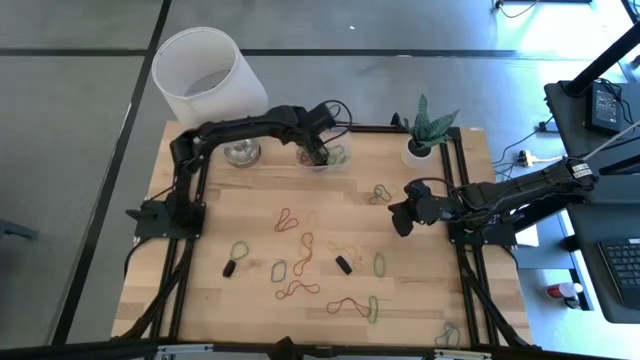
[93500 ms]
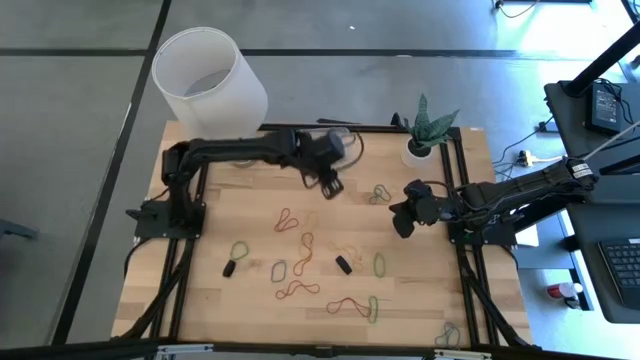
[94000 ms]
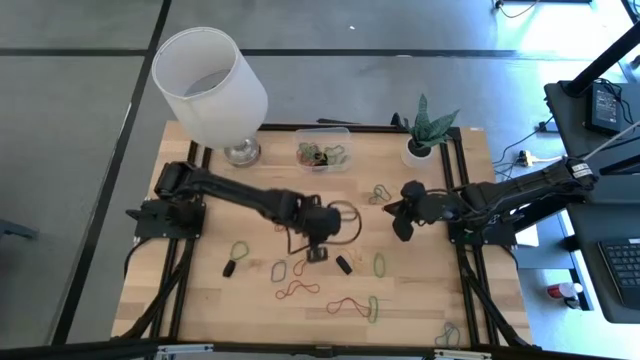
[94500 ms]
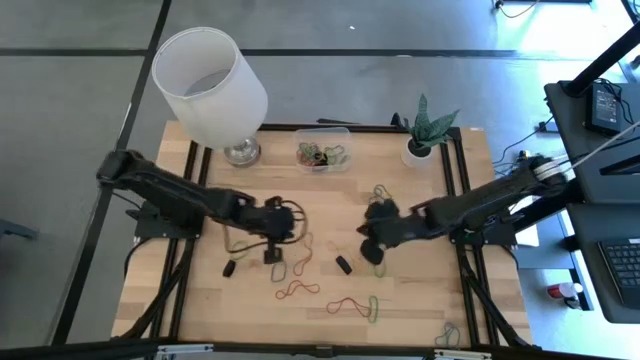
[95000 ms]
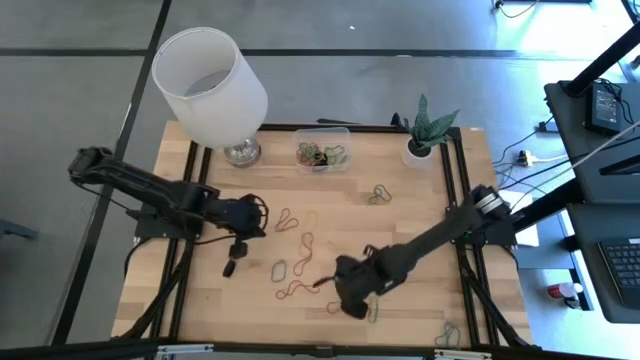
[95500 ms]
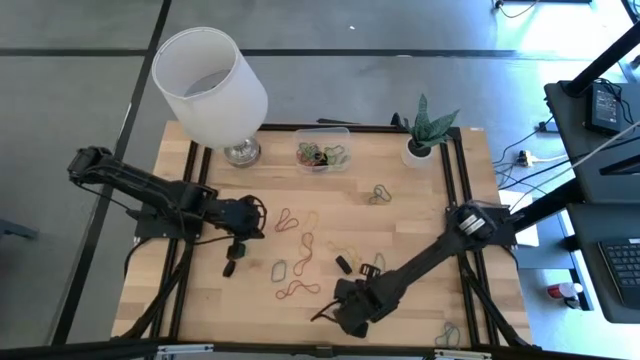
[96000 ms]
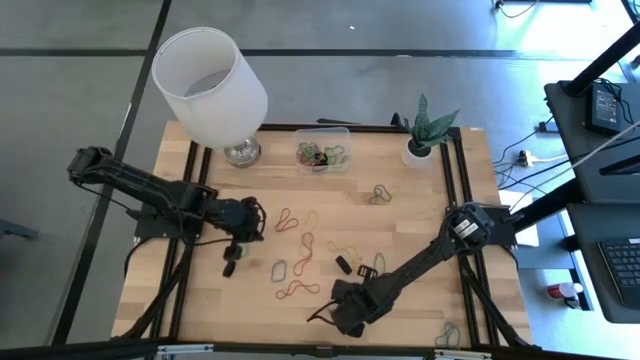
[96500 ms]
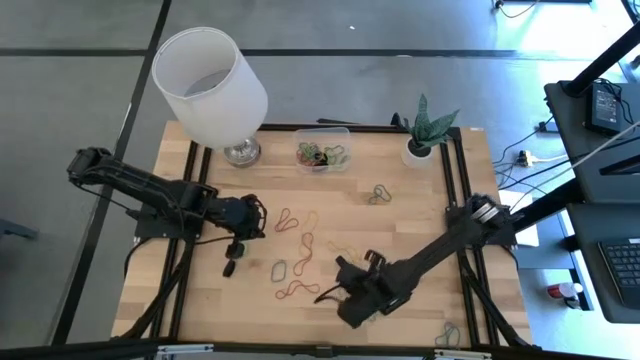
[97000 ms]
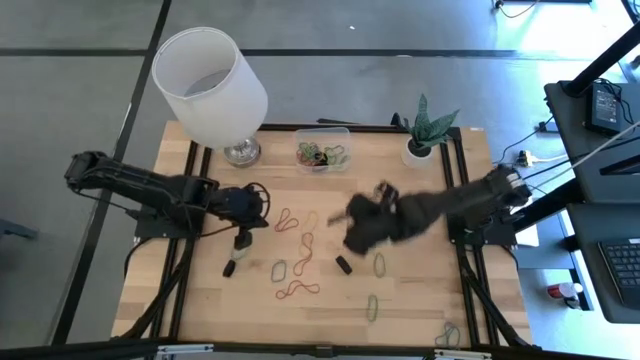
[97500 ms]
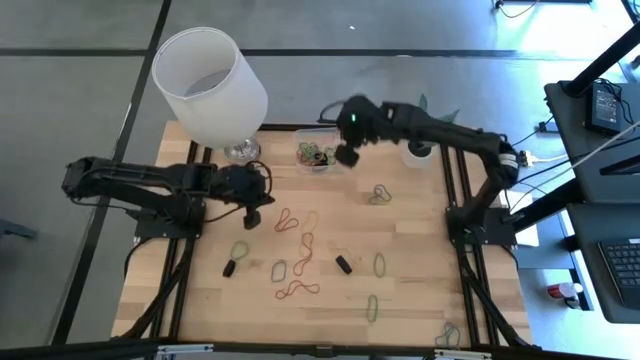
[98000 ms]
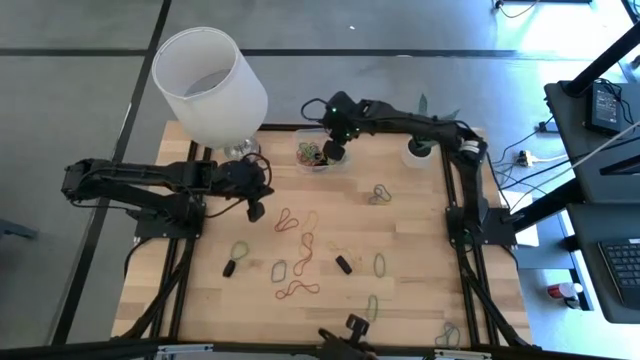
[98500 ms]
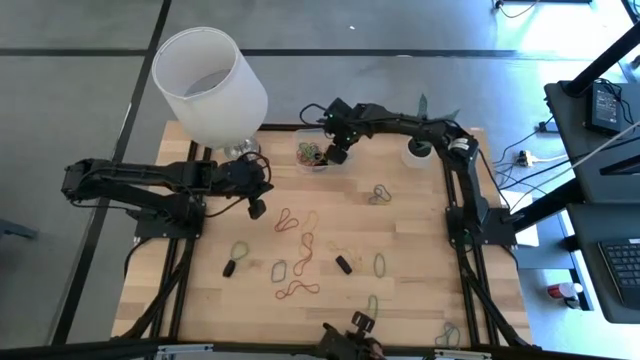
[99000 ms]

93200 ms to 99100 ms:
Task: Pick and place rubber bands into bin
Put the red rubber band into the transparent bin

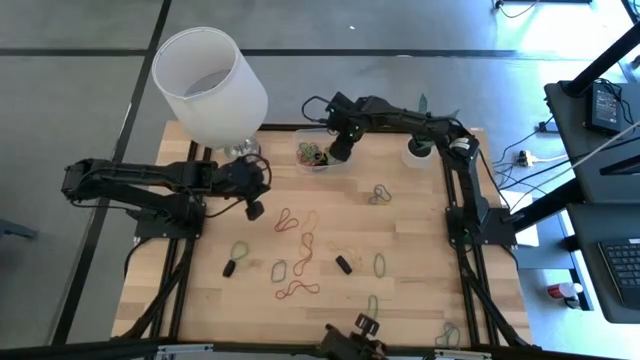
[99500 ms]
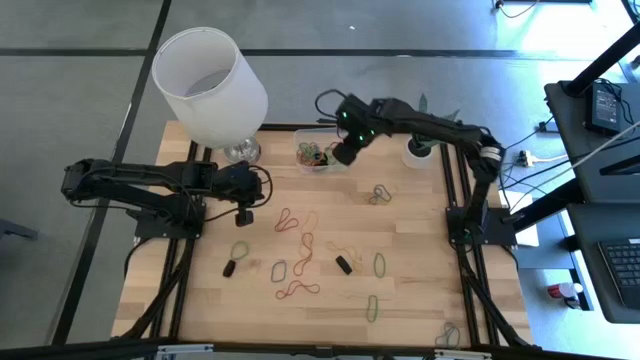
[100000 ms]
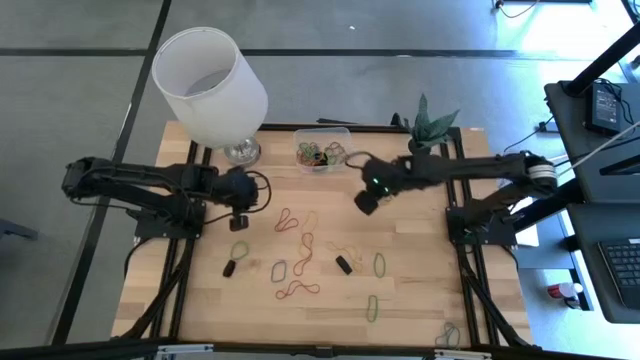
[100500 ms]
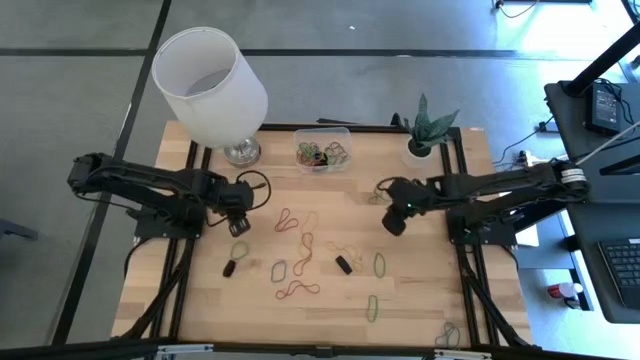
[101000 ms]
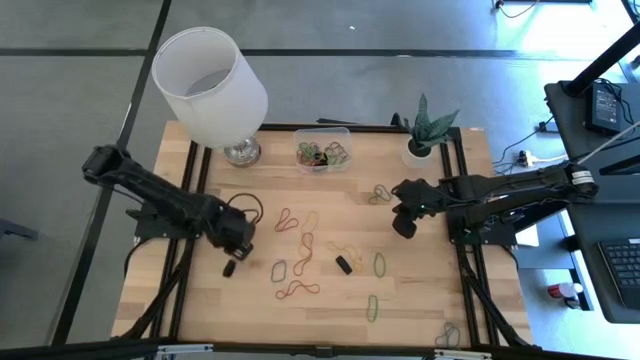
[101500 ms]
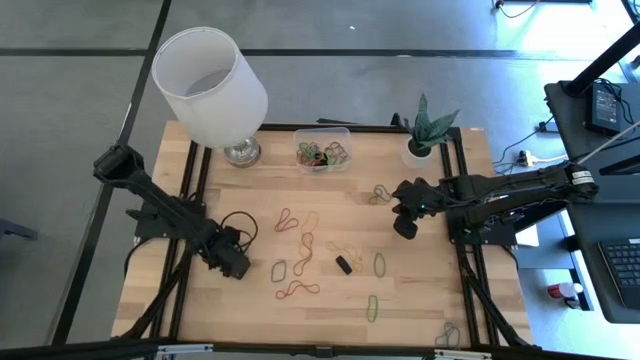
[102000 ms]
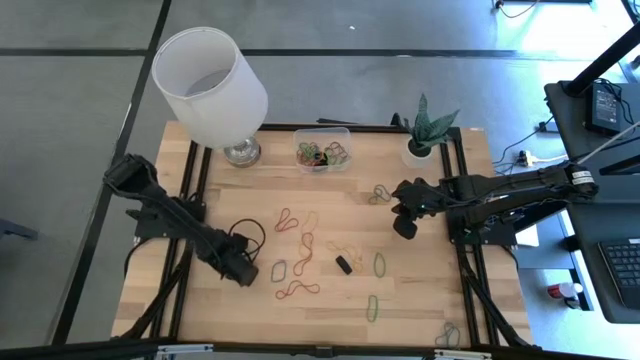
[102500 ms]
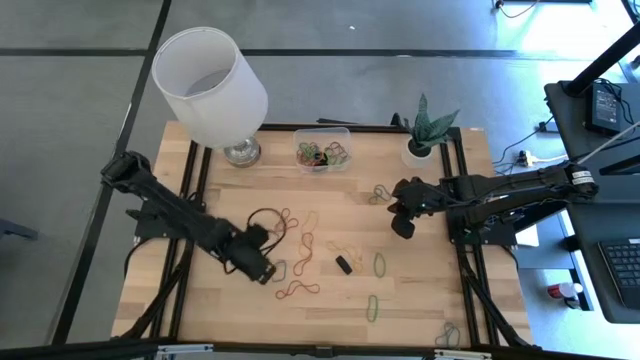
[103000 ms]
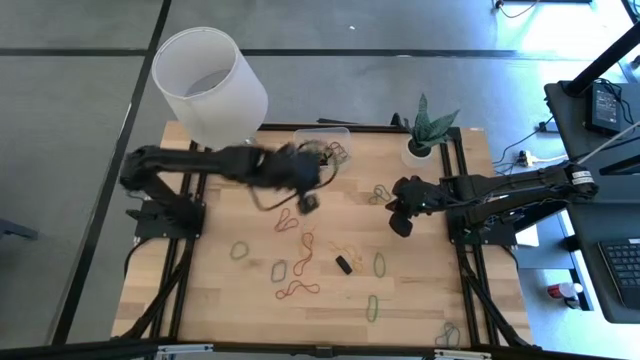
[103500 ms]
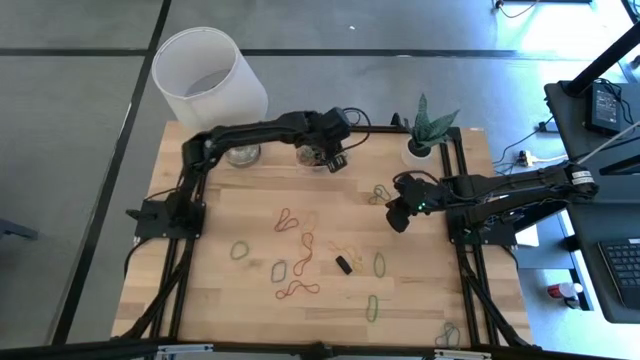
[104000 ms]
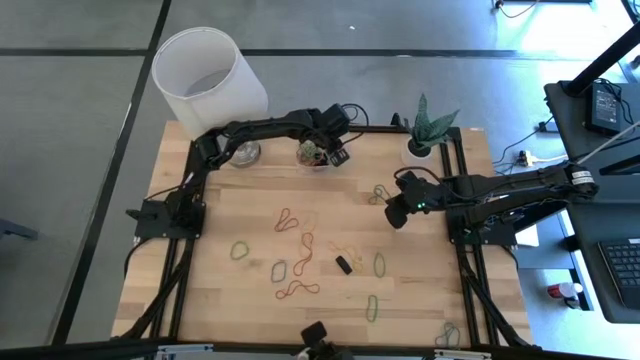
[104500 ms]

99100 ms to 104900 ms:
Put the left black rubber band into the transparent bin

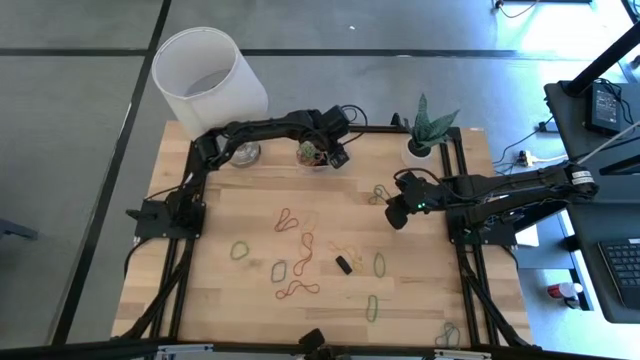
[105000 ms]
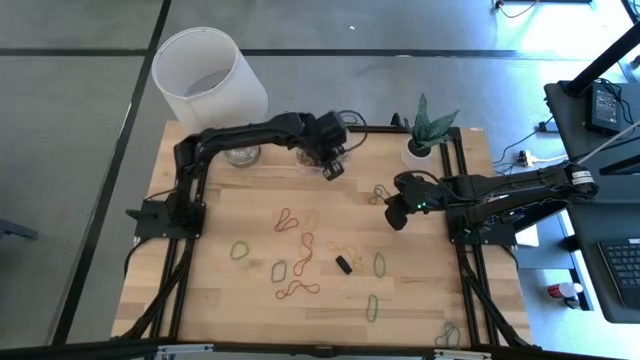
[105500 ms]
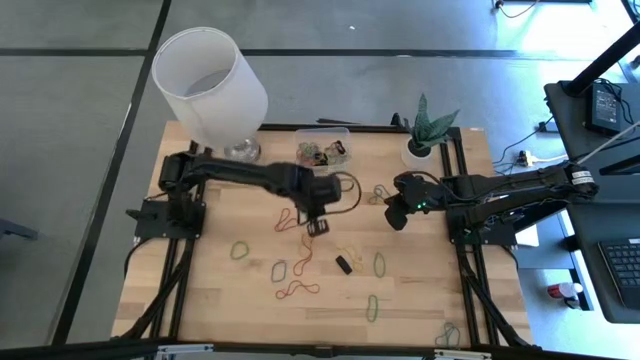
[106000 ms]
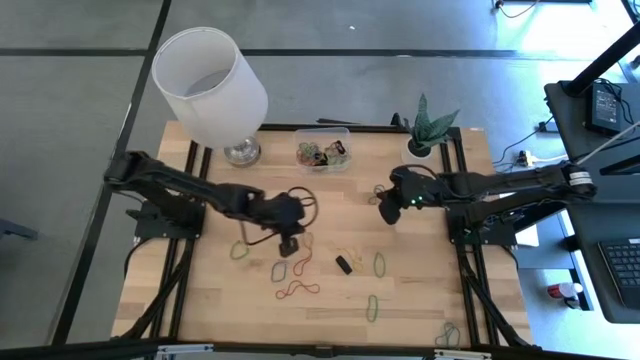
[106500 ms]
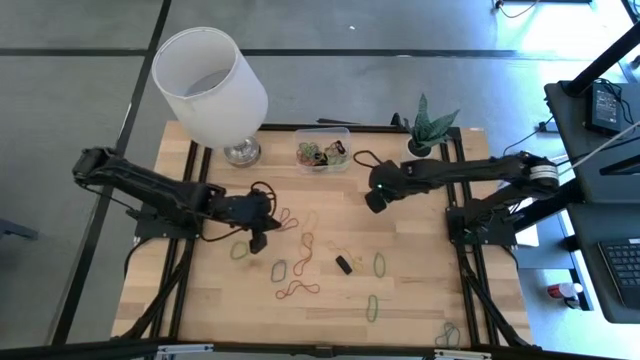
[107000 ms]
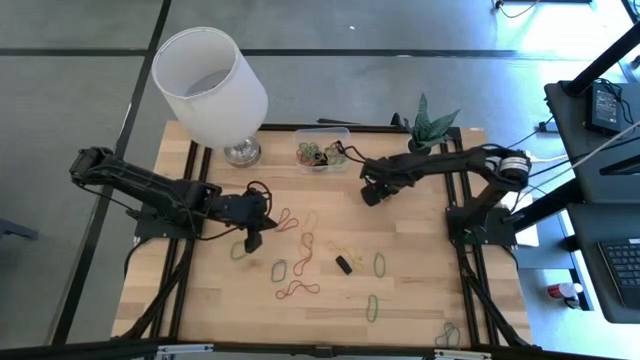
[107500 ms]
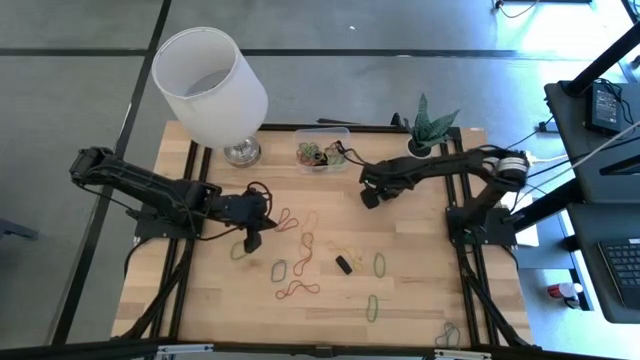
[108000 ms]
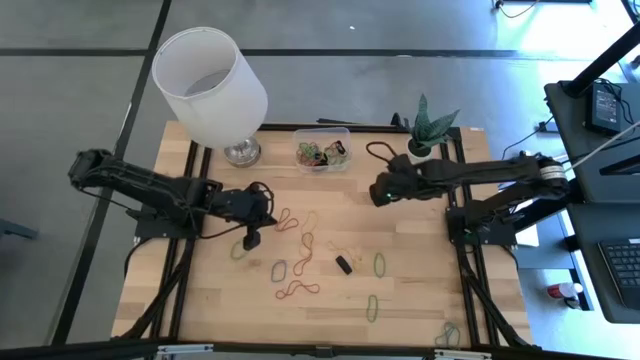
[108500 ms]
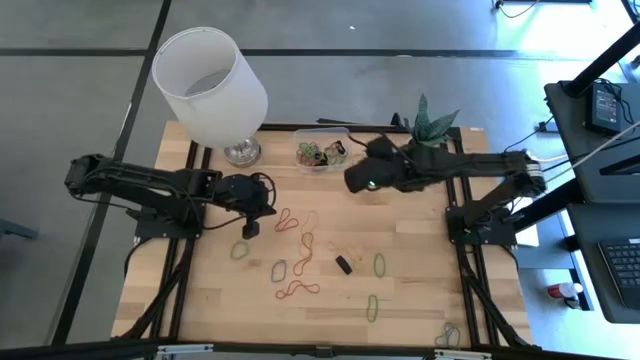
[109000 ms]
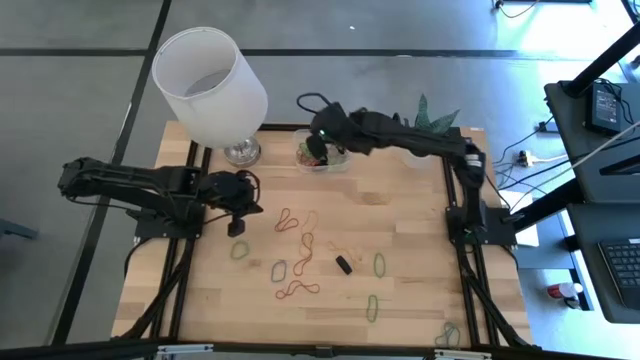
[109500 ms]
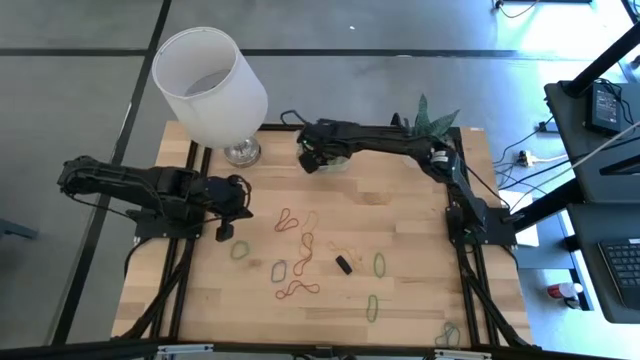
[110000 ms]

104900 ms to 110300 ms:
Put the top blue rubber band into the transparent bin

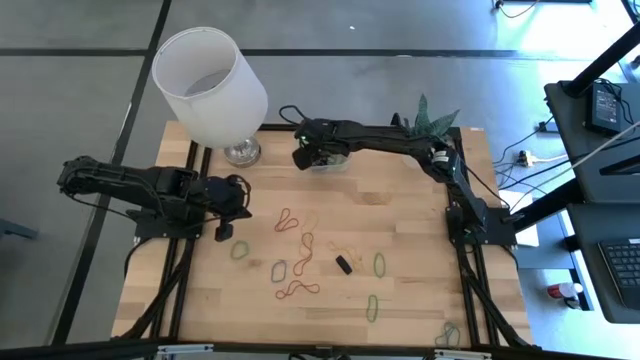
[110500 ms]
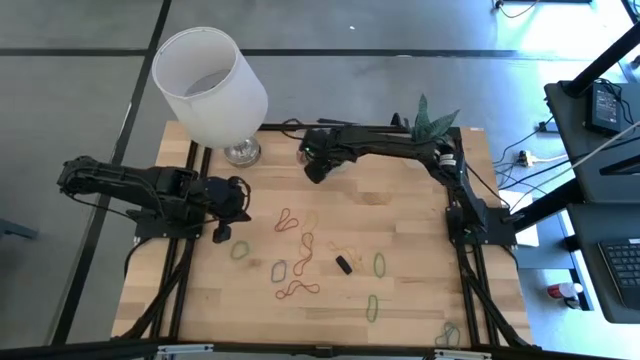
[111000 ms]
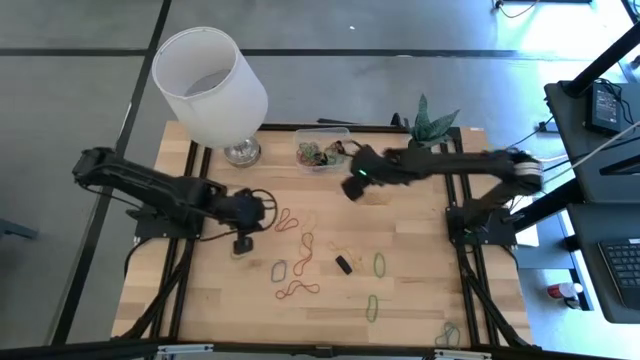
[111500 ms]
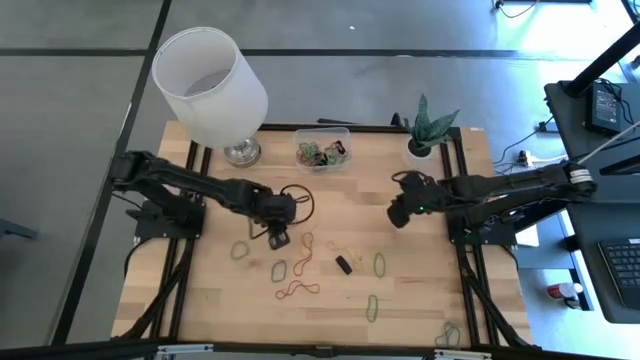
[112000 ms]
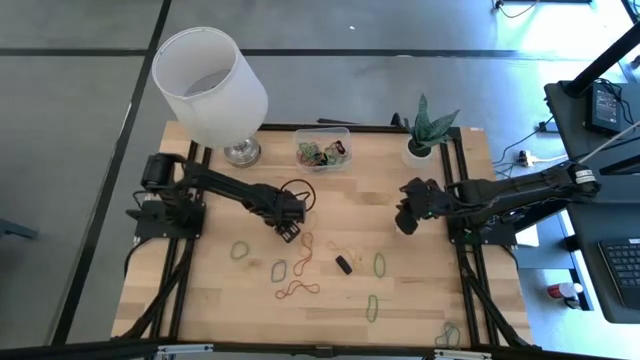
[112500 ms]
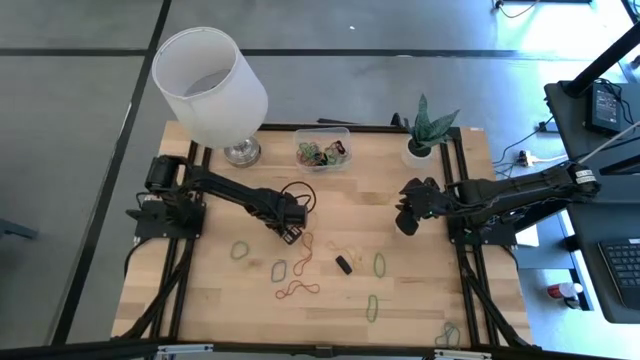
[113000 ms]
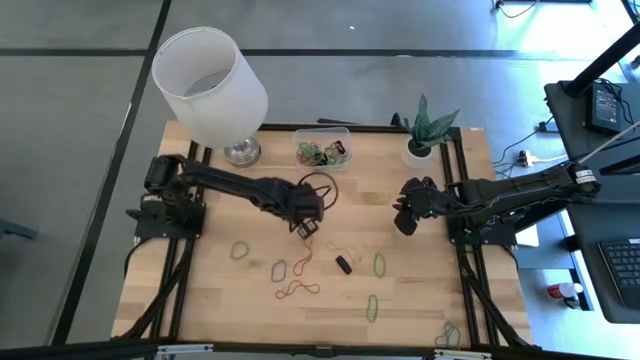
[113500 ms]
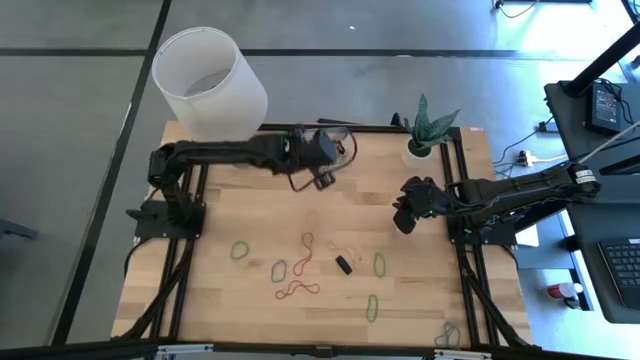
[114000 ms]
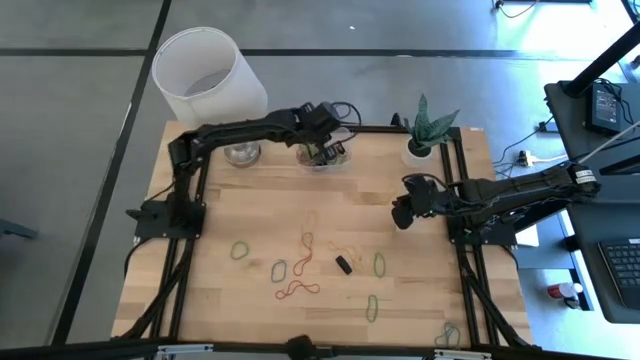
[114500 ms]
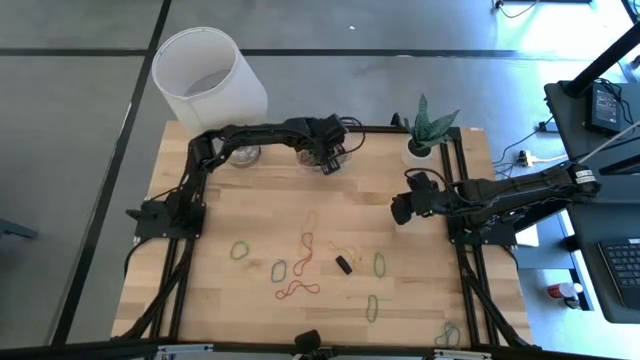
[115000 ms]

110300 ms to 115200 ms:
Put the top red rubber band into the transparent bin
